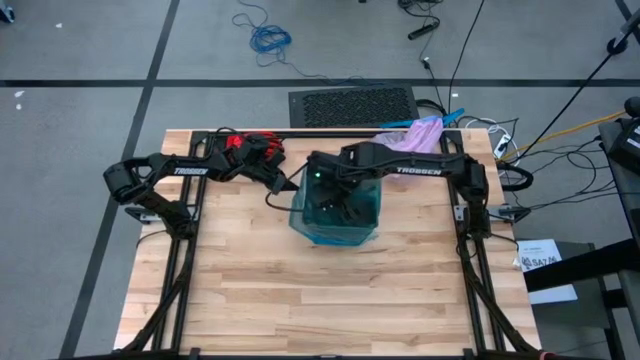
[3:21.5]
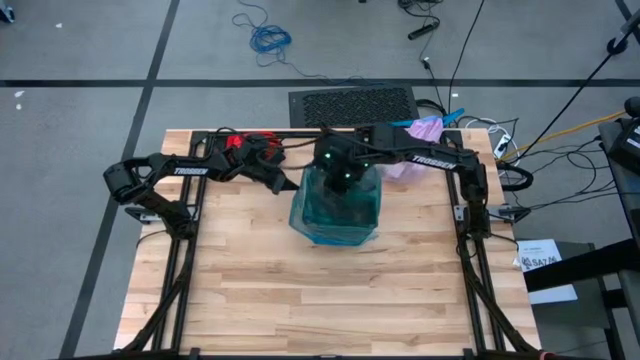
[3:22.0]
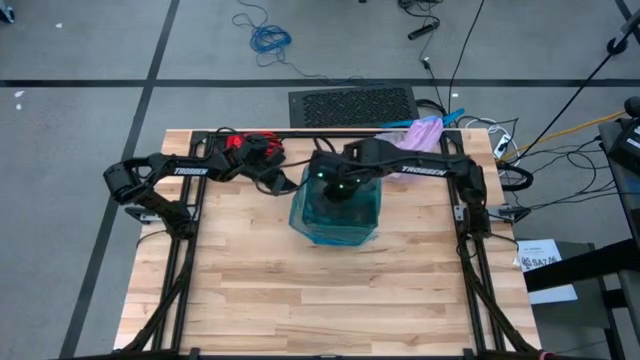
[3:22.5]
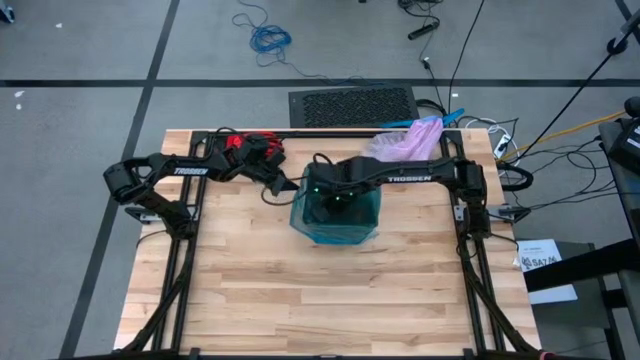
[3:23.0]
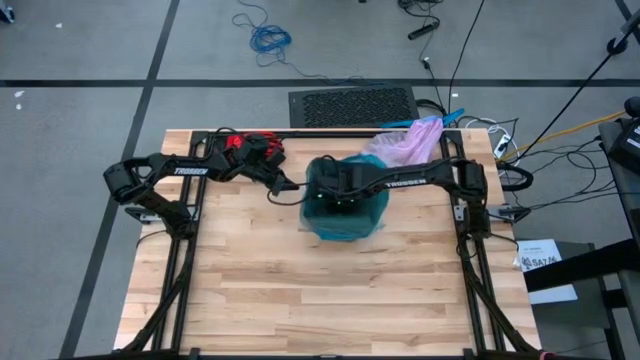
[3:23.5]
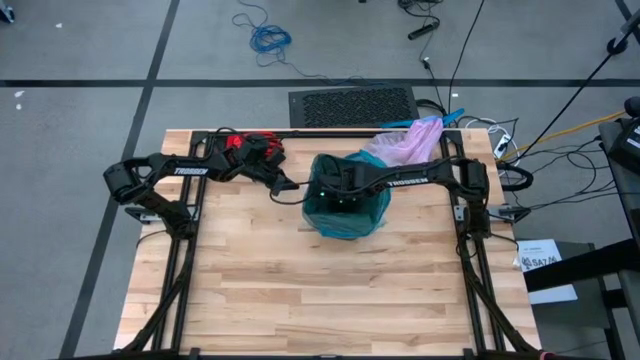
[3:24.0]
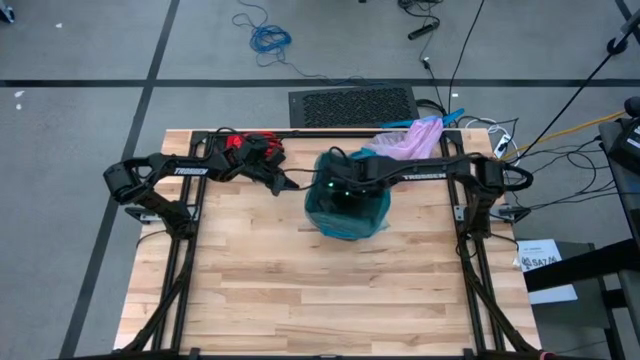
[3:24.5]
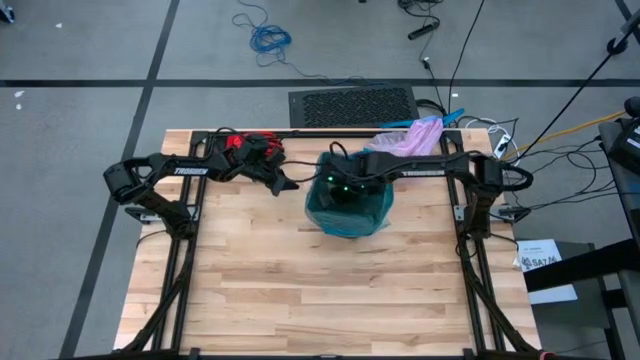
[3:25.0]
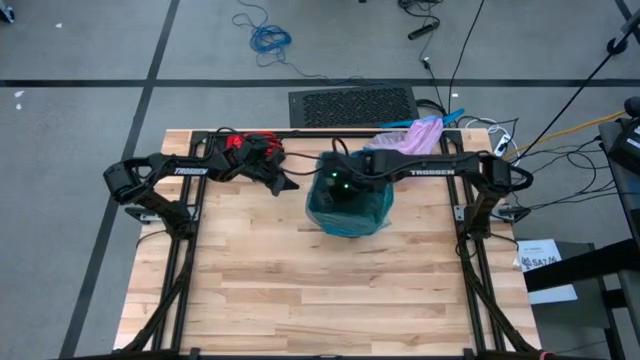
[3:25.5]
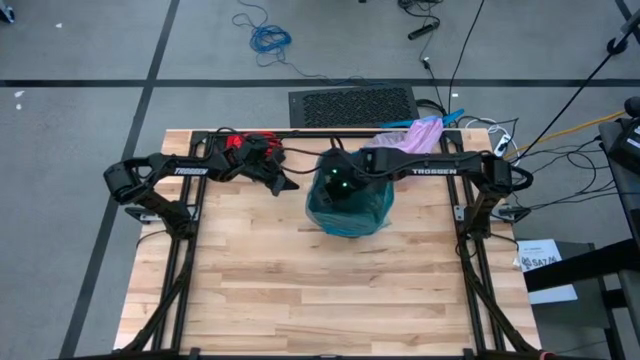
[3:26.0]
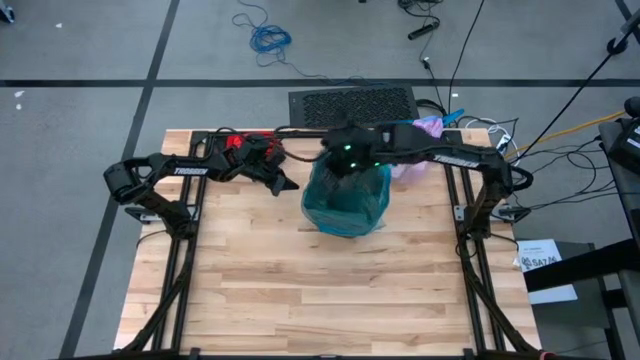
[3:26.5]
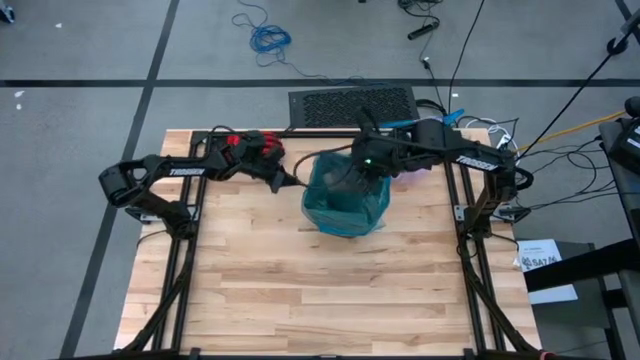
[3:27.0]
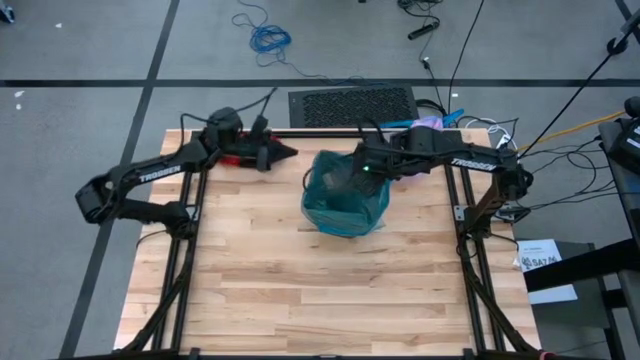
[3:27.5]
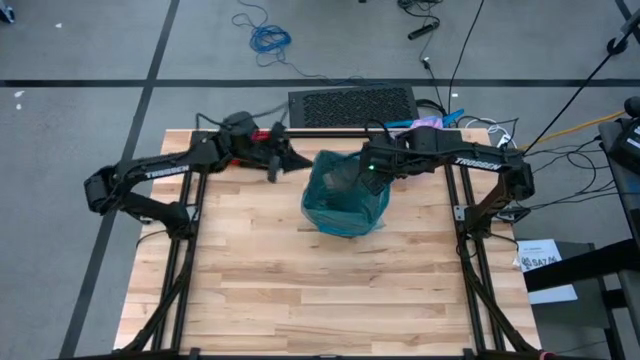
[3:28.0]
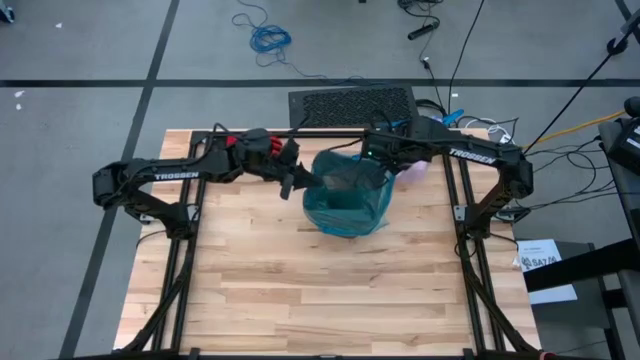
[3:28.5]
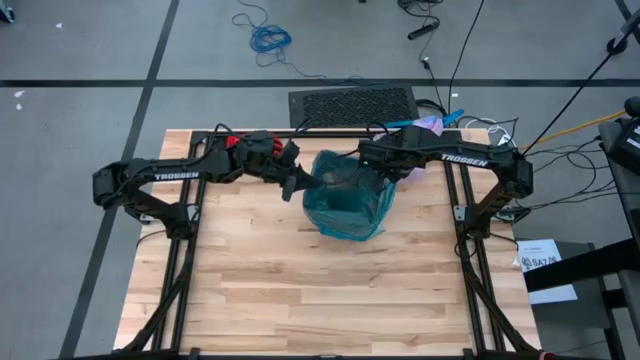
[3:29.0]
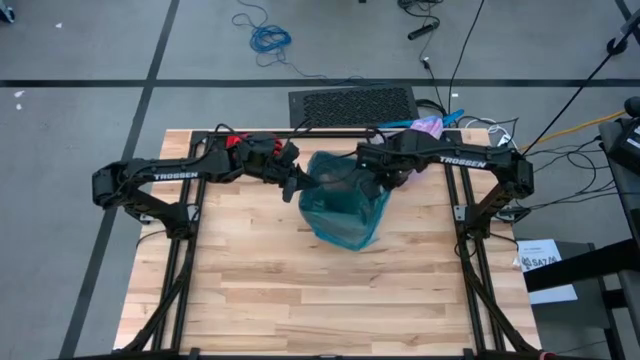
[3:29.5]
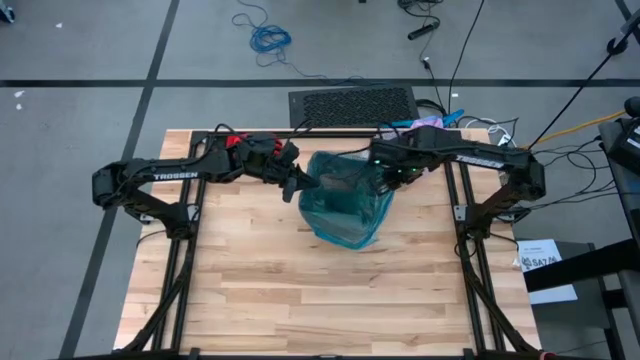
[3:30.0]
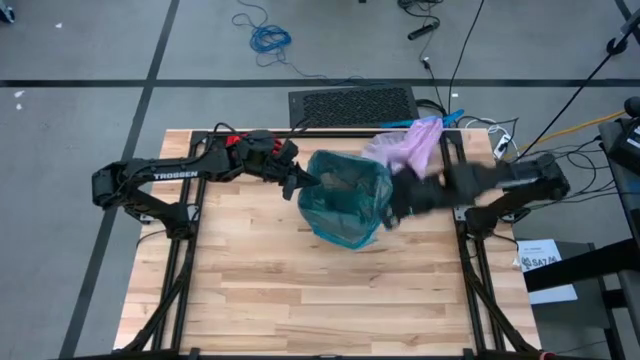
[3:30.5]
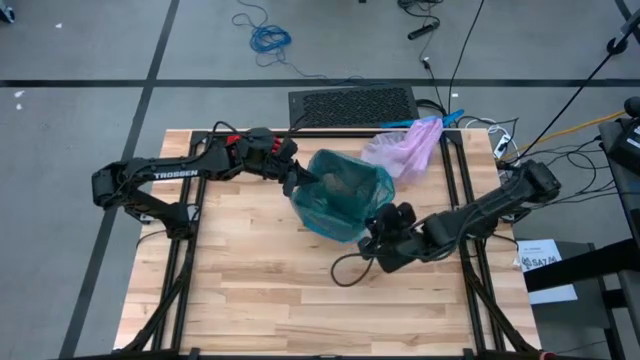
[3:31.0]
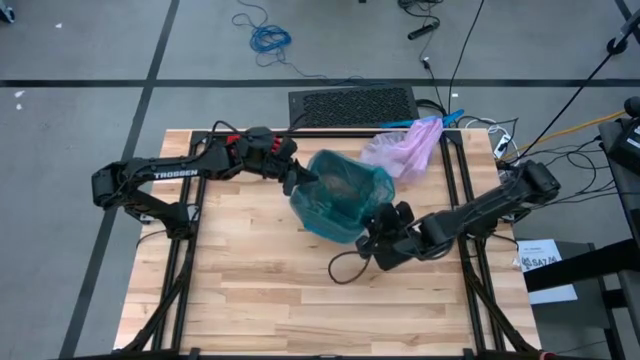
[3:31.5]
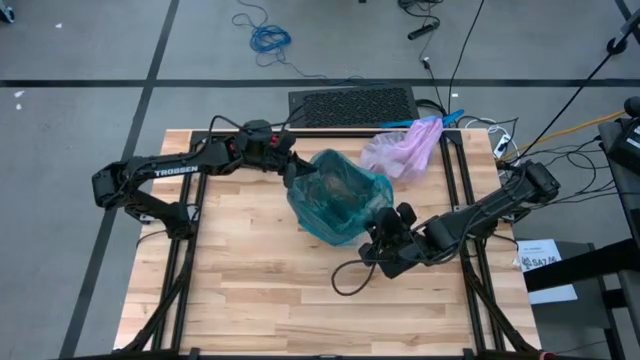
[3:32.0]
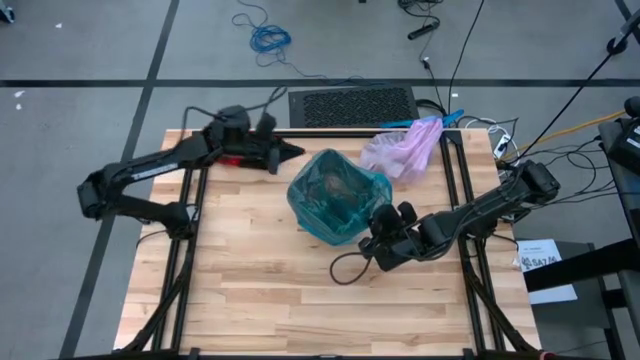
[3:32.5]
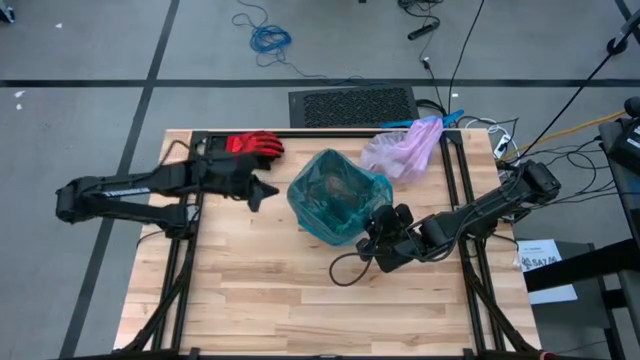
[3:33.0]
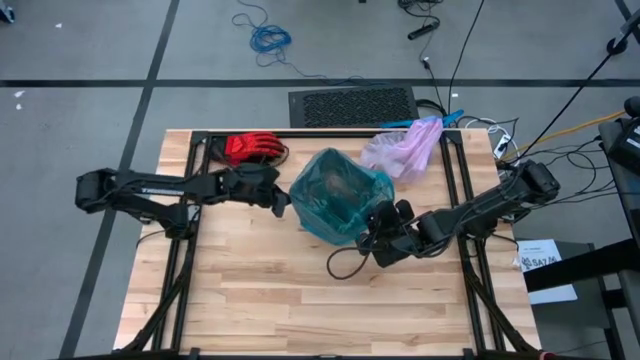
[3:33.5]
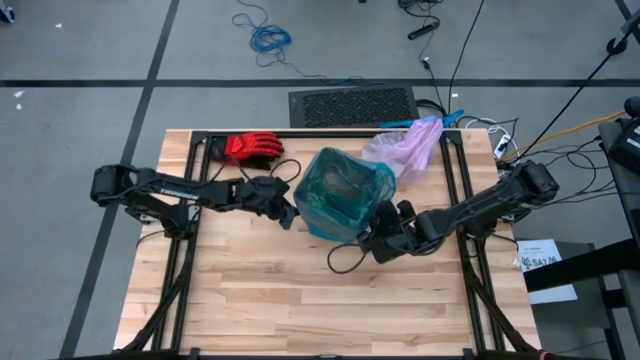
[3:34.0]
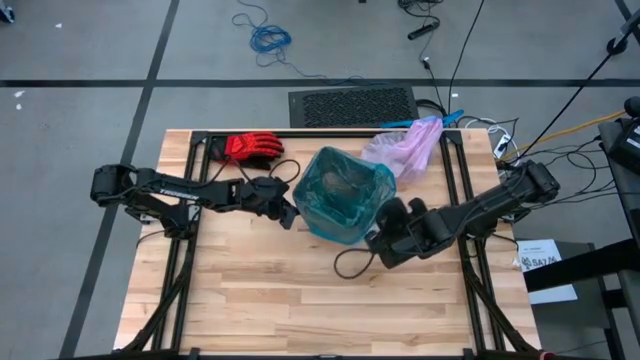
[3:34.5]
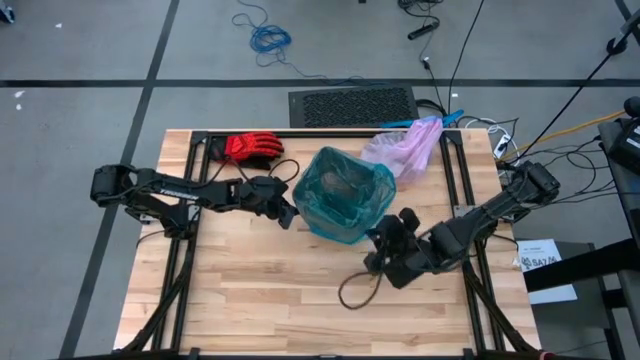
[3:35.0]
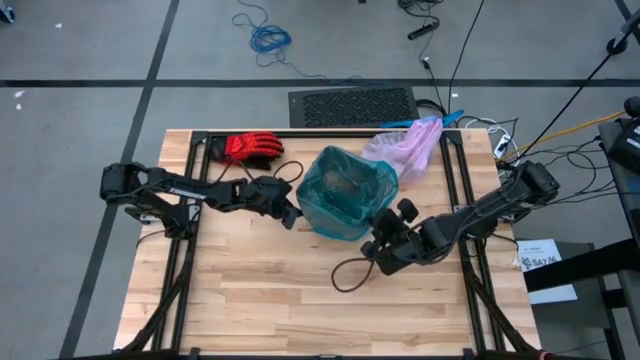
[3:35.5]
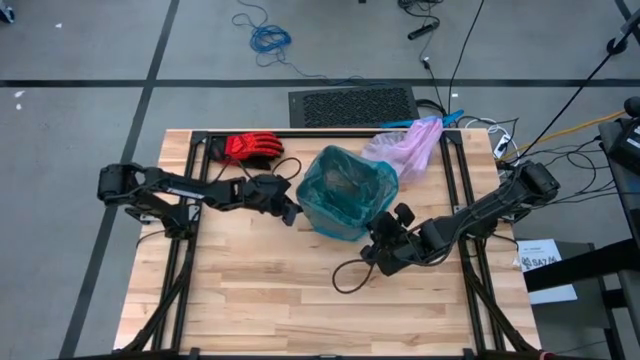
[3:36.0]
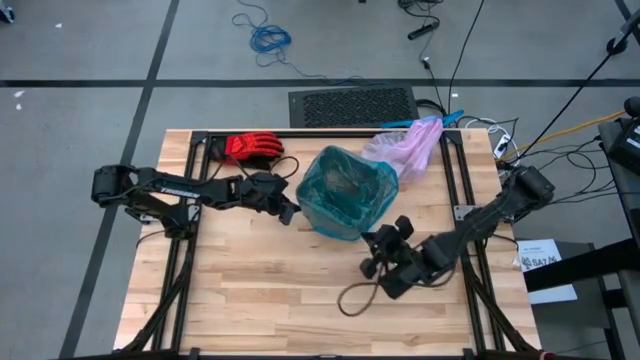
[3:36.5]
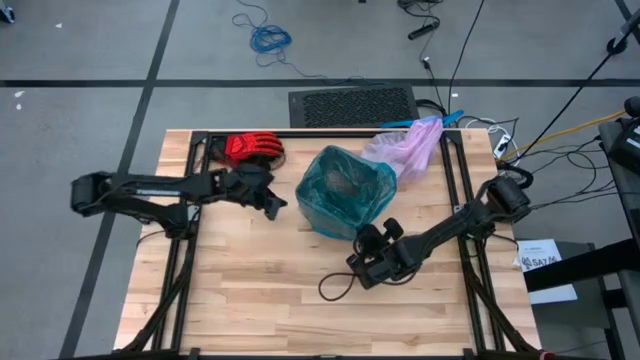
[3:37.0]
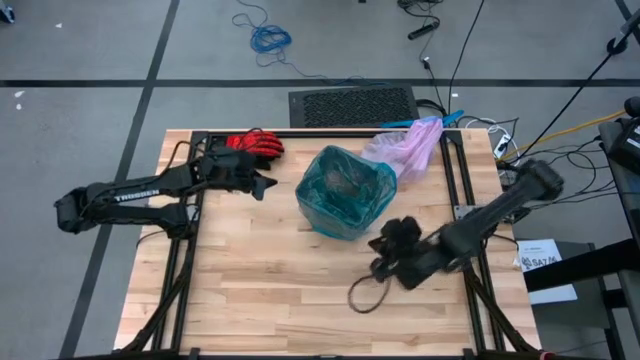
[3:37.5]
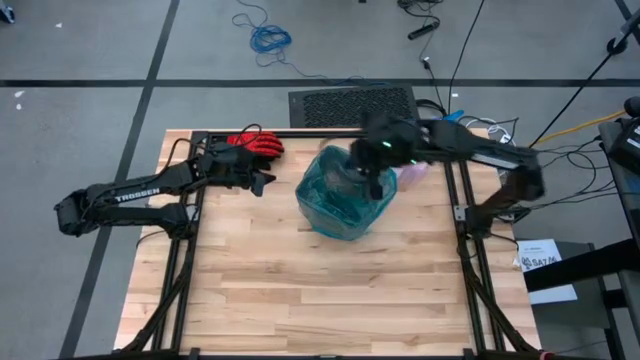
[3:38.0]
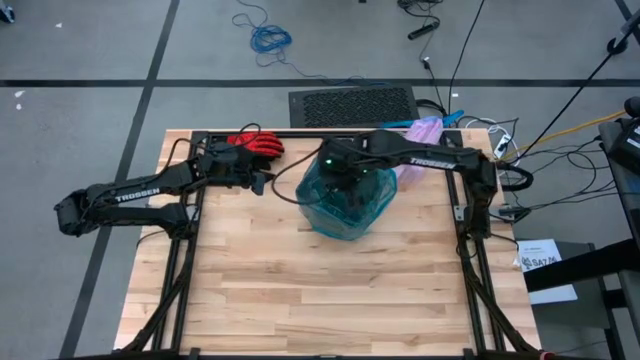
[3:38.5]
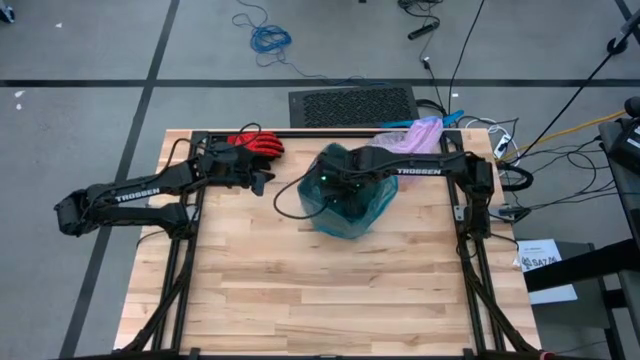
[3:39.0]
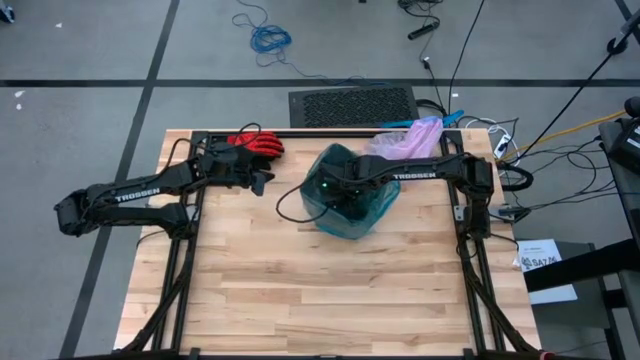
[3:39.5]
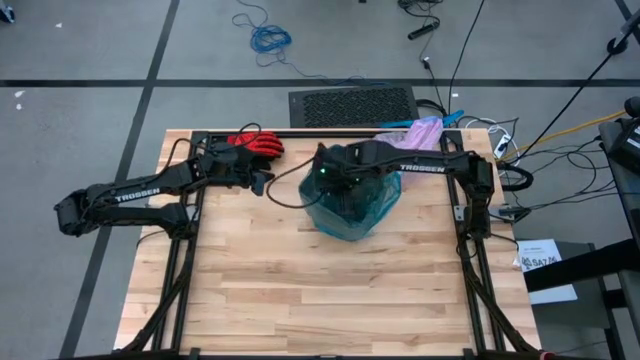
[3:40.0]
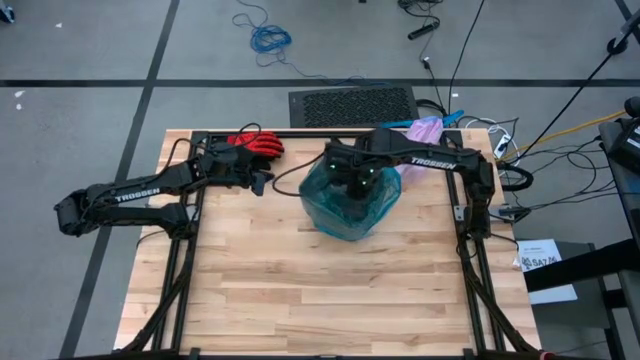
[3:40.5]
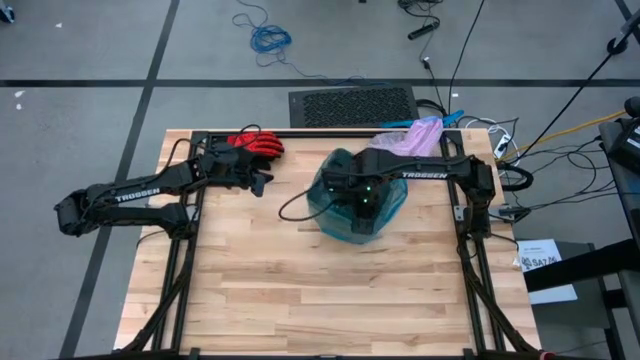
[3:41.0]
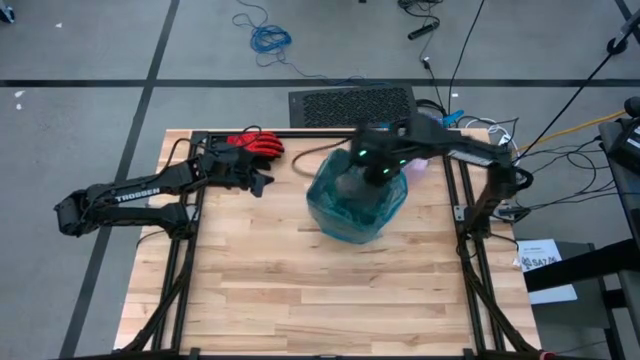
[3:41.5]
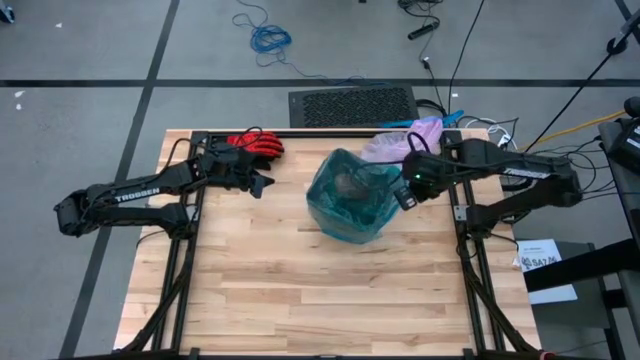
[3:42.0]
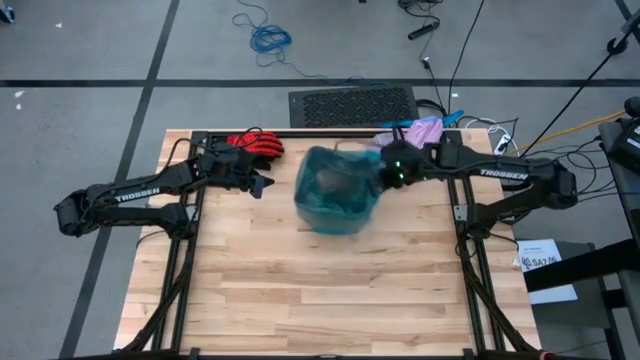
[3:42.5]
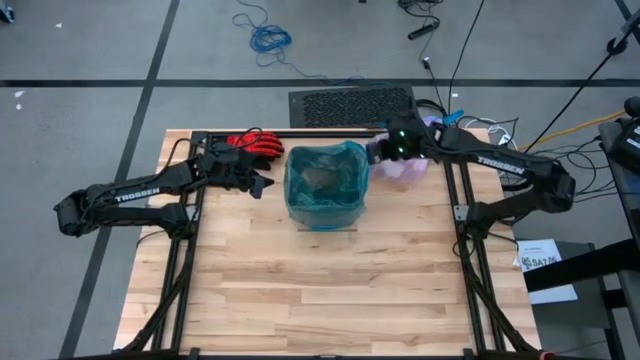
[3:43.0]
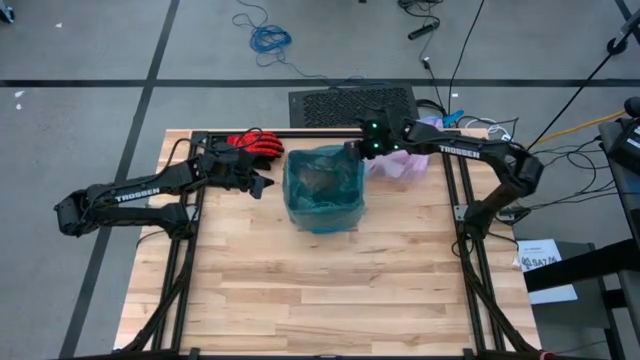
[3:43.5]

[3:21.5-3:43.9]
Task: place trash/remove bag and relplace
Insert the new blue trash bag into the trash bin
